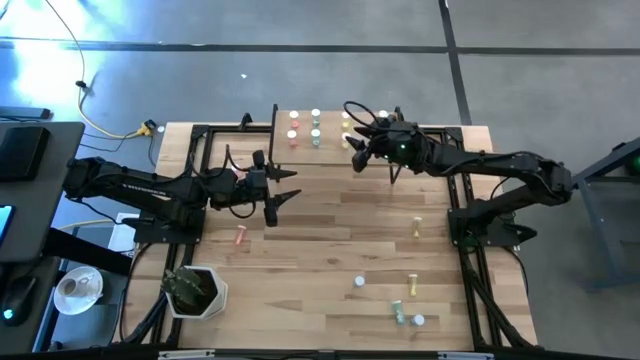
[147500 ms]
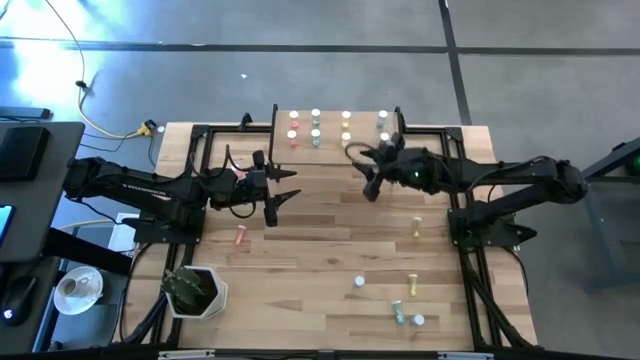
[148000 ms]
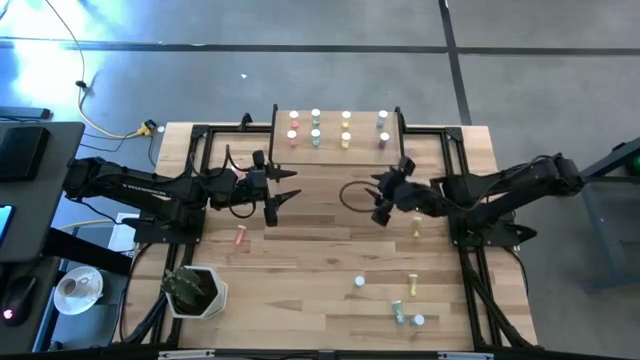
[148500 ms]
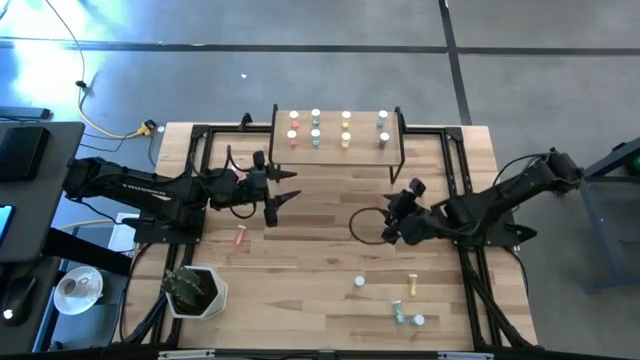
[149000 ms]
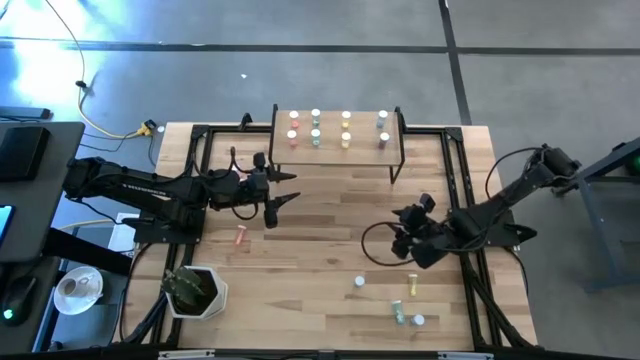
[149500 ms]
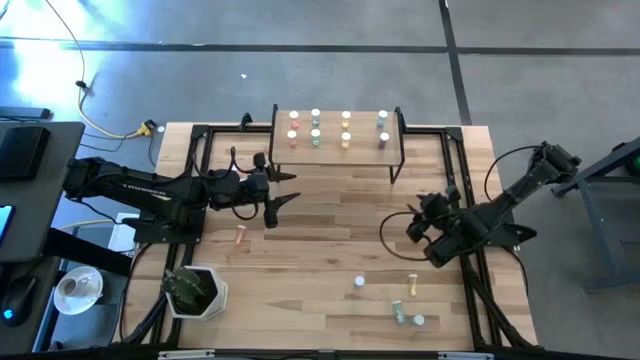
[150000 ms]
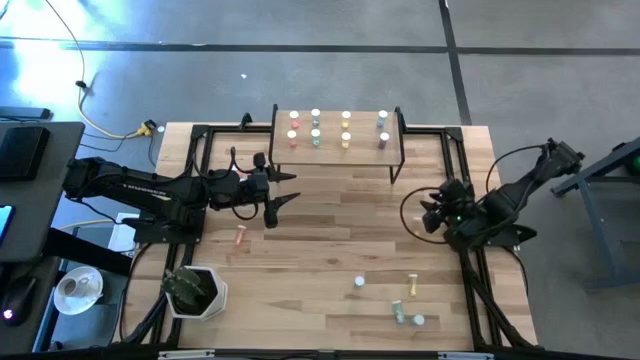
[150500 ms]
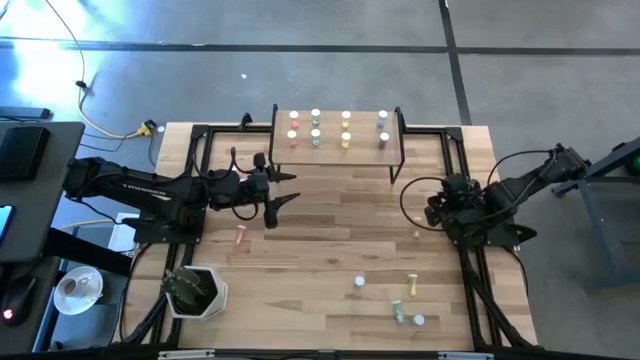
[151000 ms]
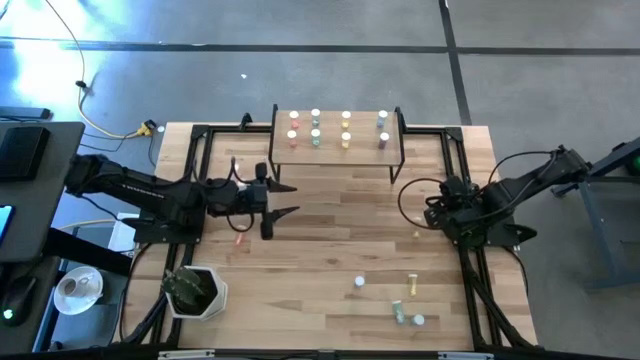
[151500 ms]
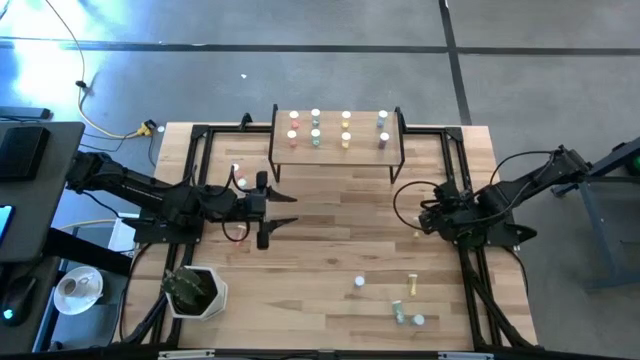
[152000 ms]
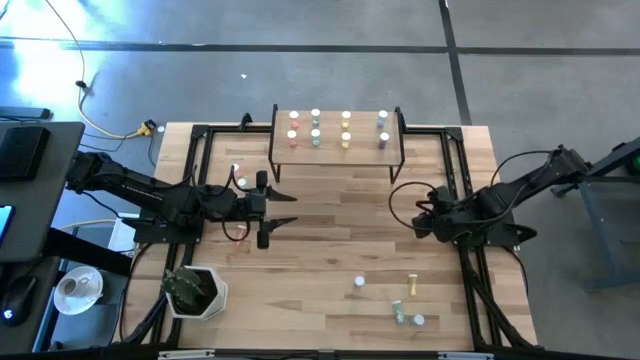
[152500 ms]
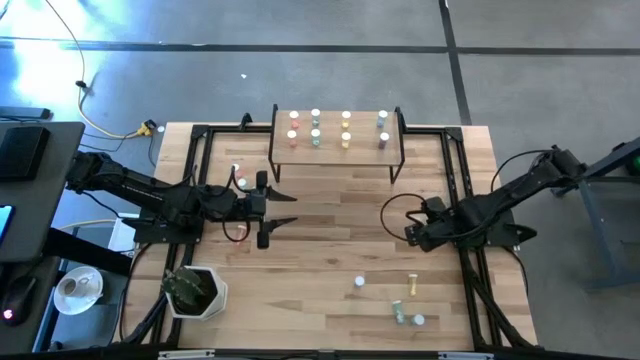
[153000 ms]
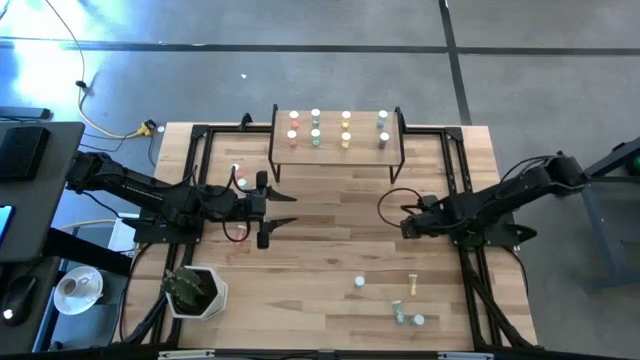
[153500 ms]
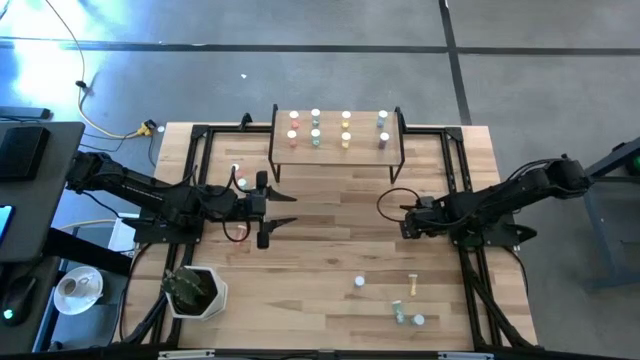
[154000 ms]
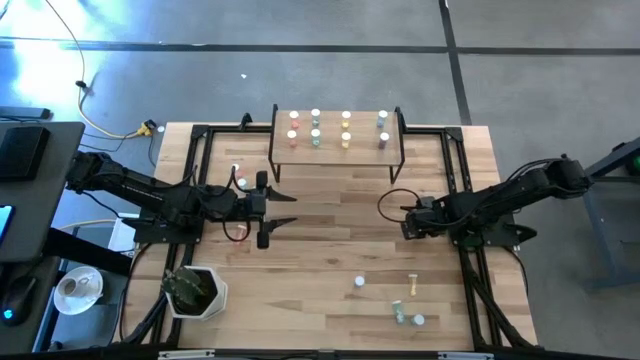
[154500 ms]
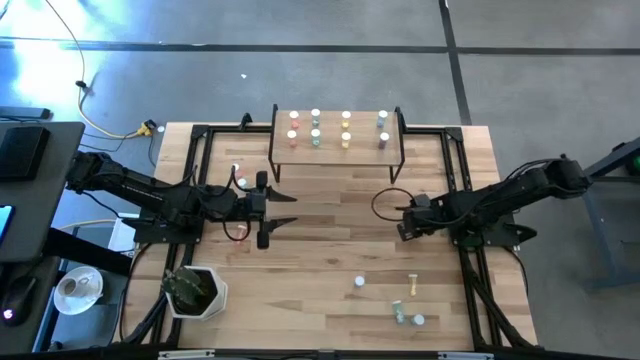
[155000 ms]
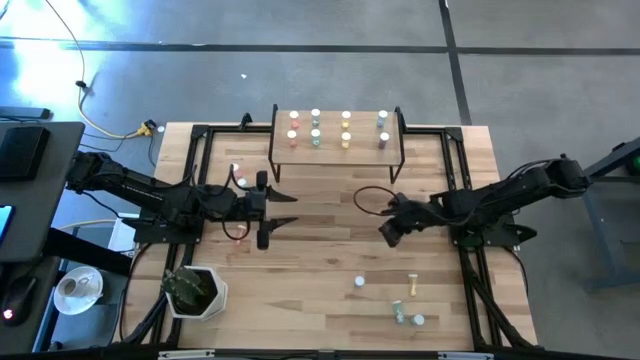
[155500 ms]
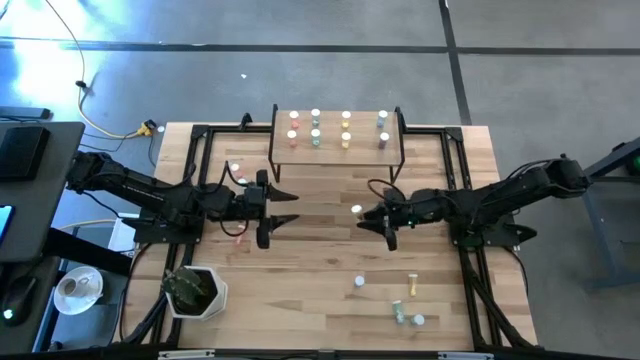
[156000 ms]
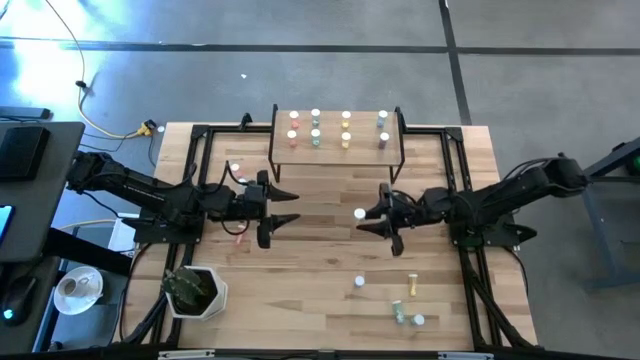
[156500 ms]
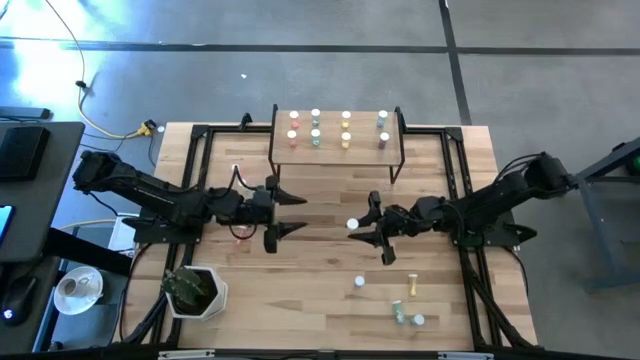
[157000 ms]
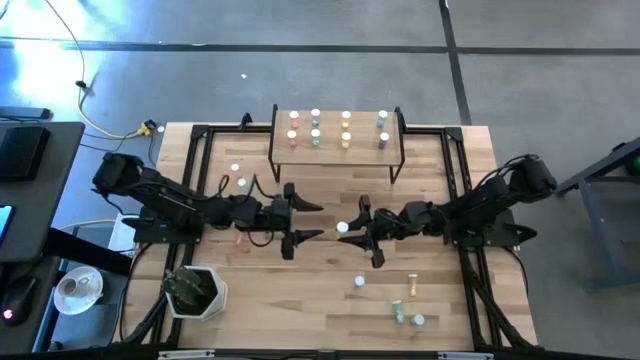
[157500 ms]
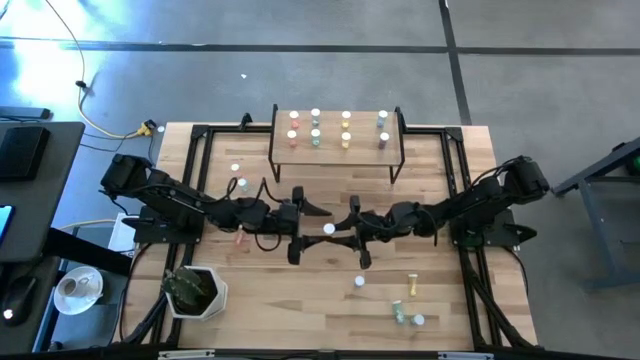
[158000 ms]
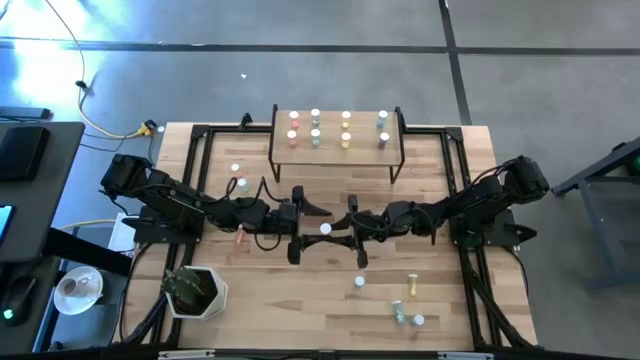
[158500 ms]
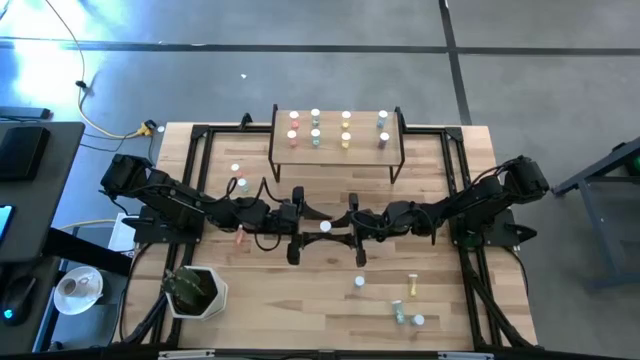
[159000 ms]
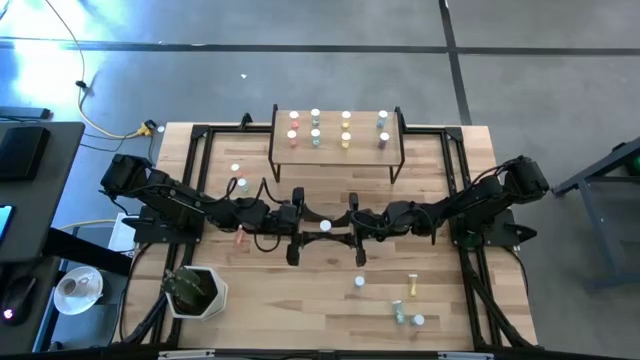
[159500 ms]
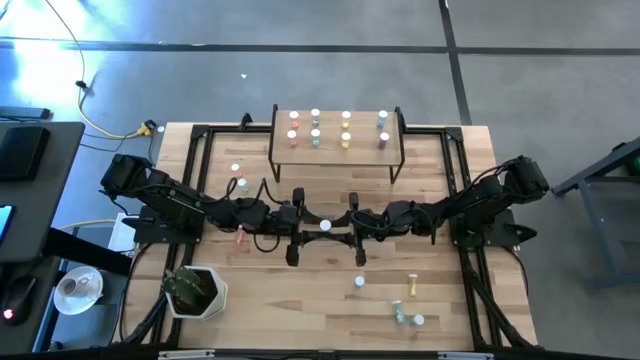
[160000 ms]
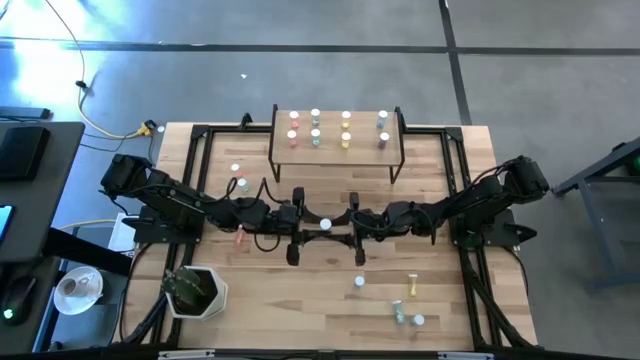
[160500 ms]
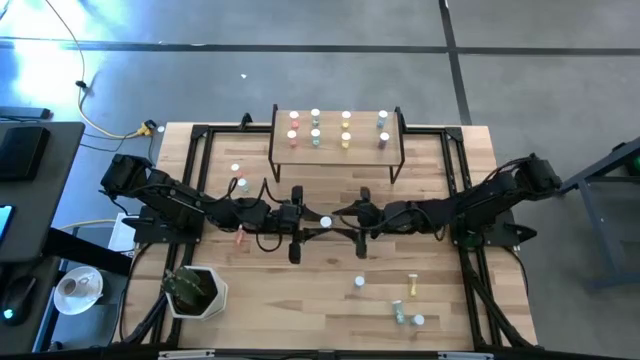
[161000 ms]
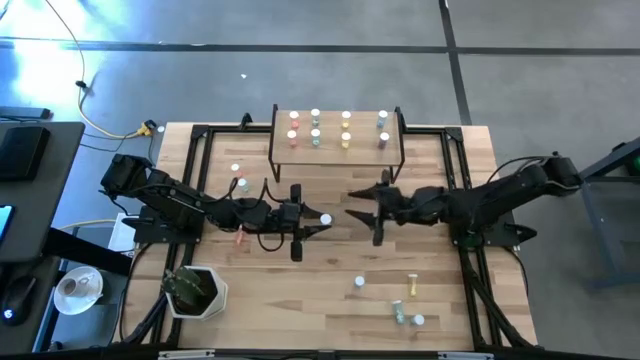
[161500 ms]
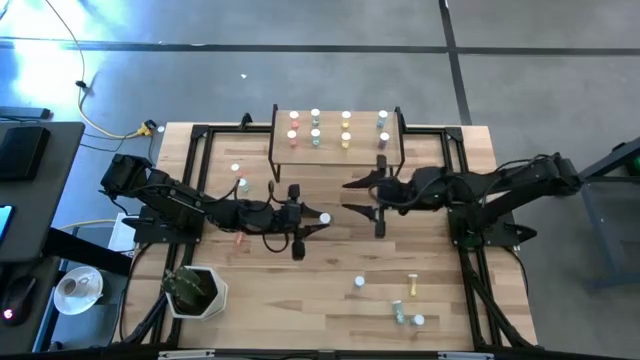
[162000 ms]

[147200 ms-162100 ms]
Task: Pick and place medicine bottles onto shelf by color
Put the yellow medicine bottle on the shelf

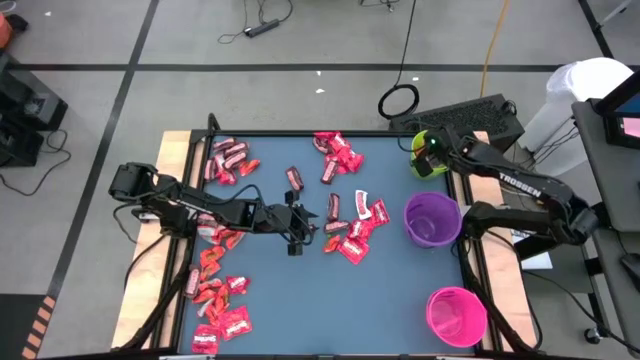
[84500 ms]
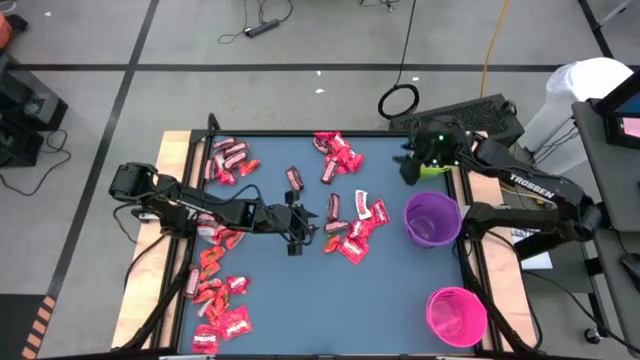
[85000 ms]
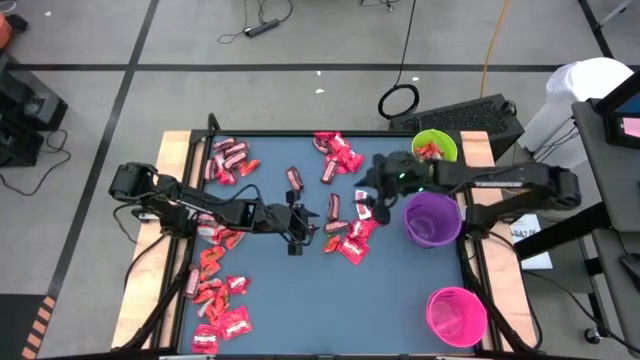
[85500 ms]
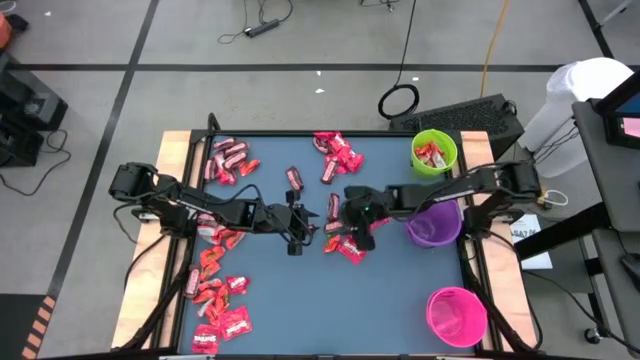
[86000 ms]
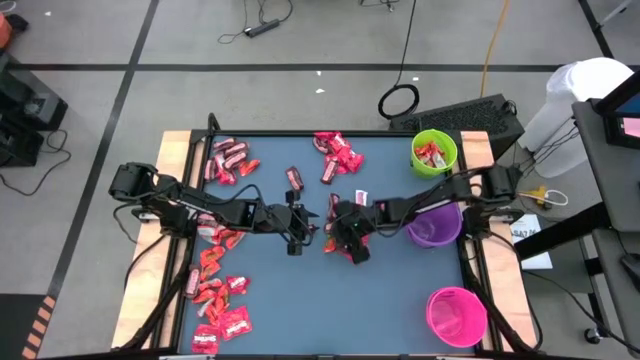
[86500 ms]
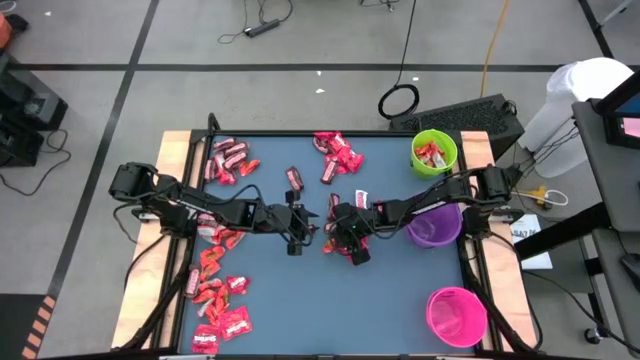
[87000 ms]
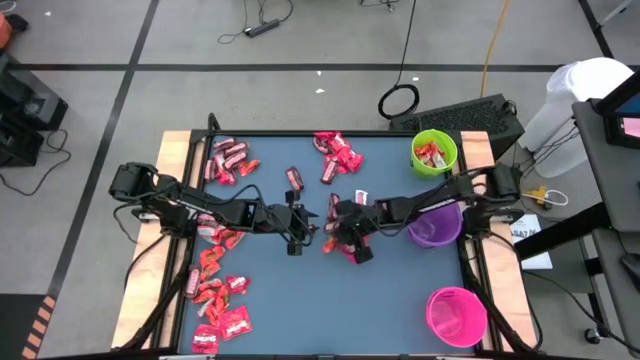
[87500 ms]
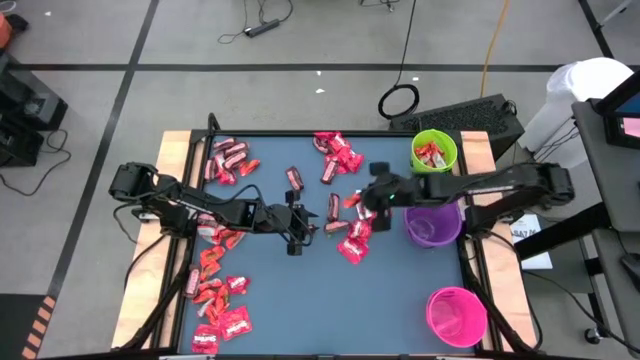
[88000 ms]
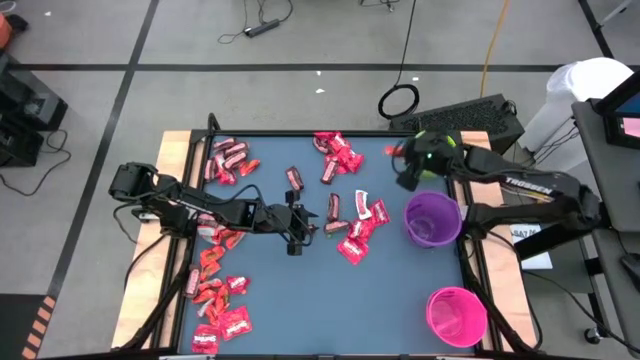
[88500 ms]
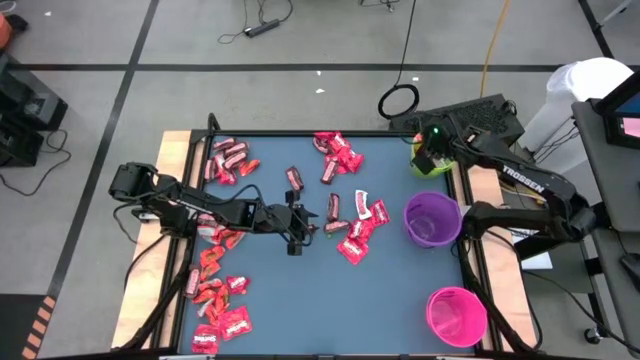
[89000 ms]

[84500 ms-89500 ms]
Task: Organize candy in baskets
Put the orange chocolate bar into the green bucket

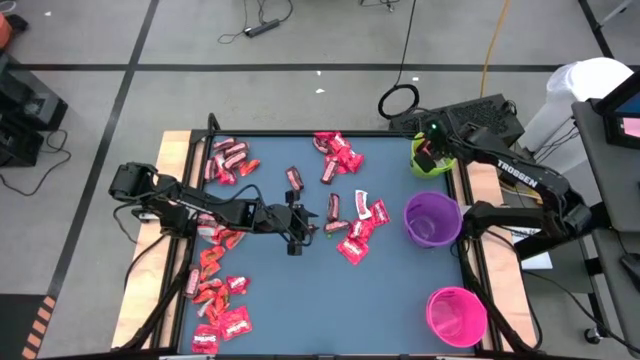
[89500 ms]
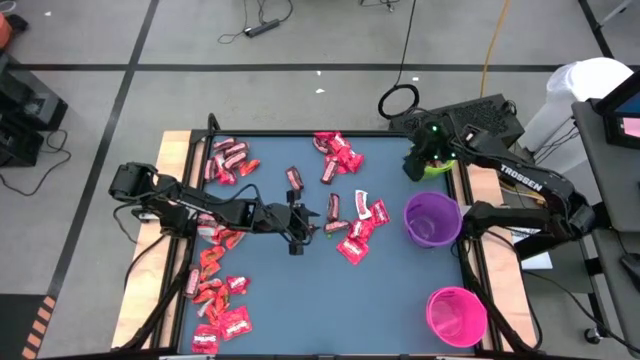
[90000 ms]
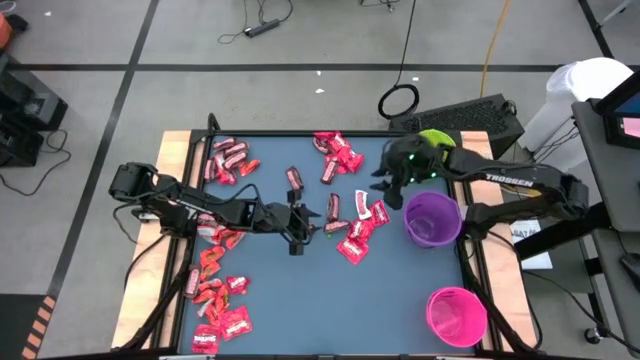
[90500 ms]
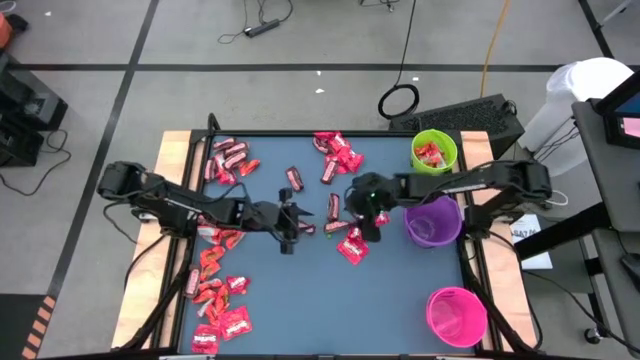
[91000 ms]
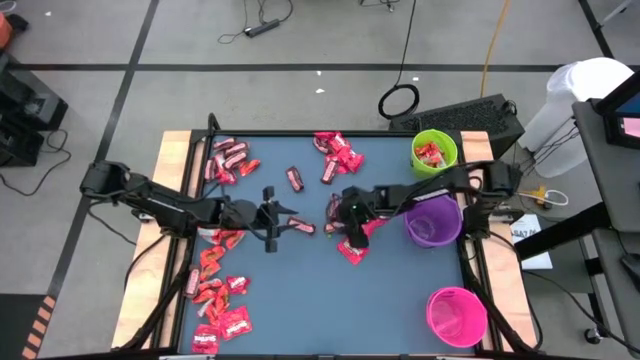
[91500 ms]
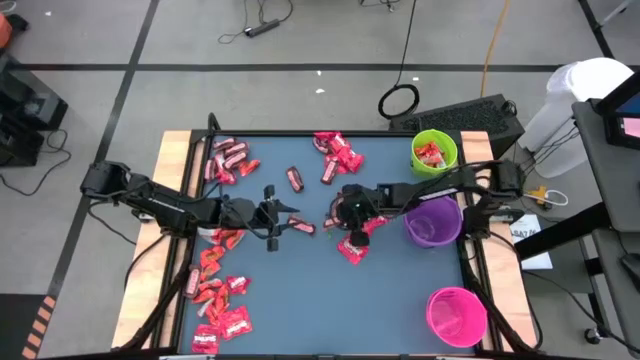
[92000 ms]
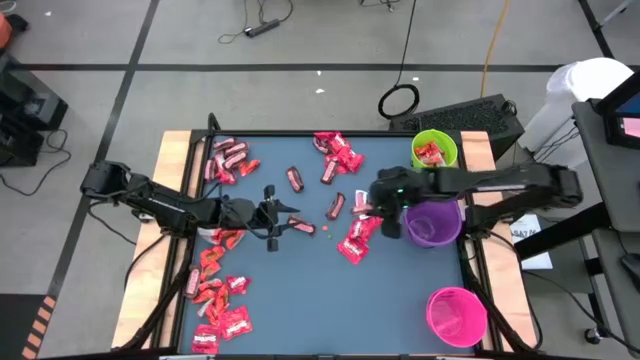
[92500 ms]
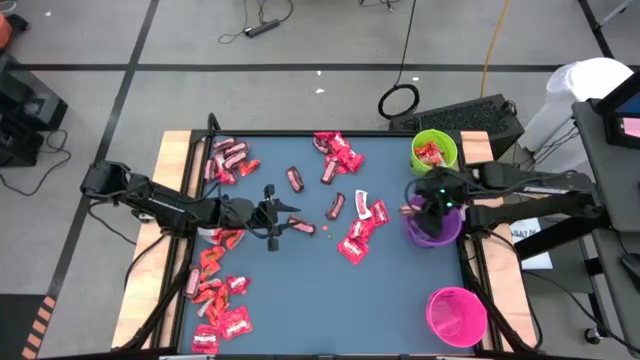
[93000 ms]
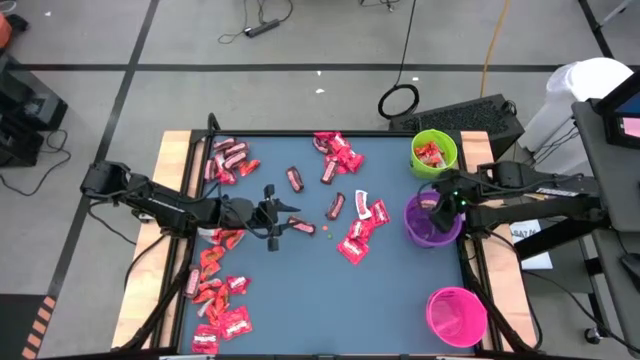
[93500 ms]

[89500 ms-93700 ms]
Put the brown chocolate bar into the violet bucket
